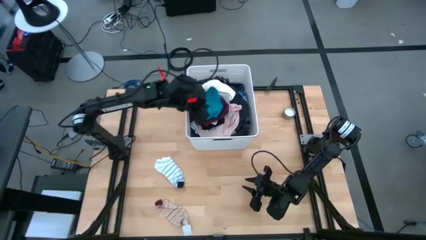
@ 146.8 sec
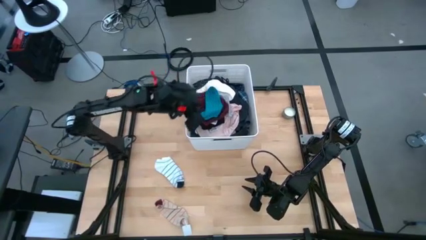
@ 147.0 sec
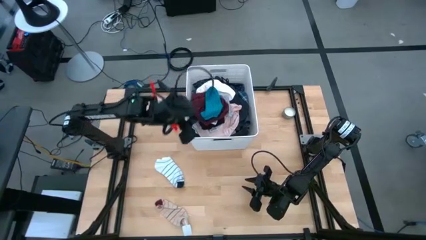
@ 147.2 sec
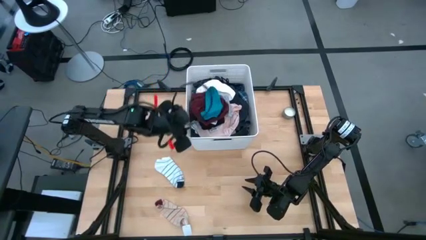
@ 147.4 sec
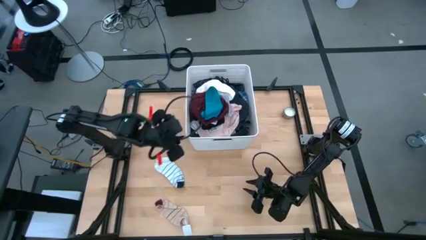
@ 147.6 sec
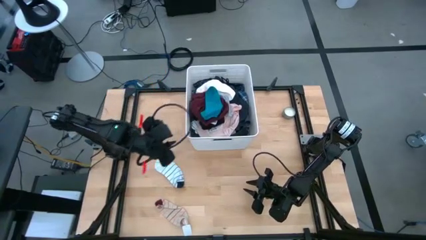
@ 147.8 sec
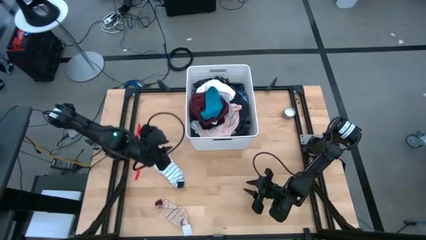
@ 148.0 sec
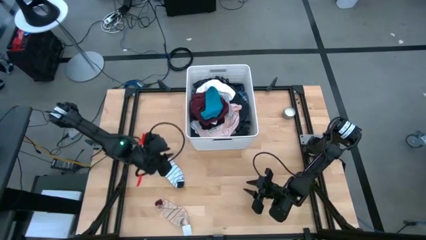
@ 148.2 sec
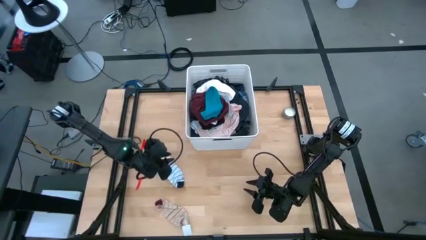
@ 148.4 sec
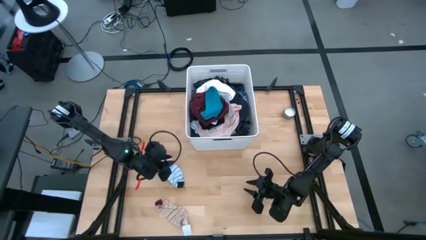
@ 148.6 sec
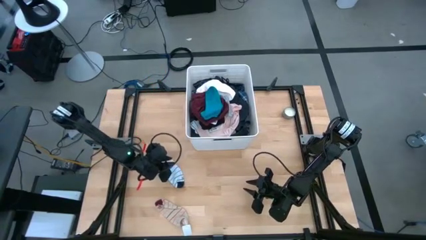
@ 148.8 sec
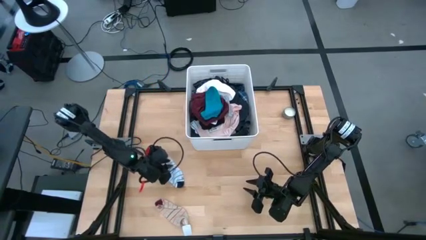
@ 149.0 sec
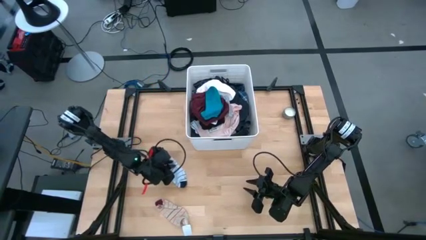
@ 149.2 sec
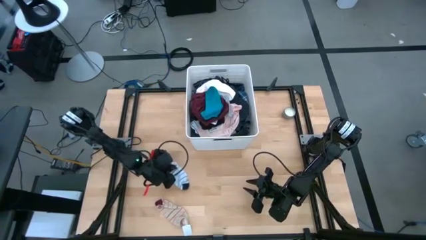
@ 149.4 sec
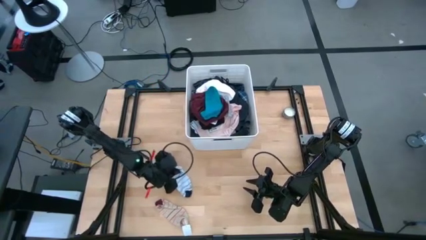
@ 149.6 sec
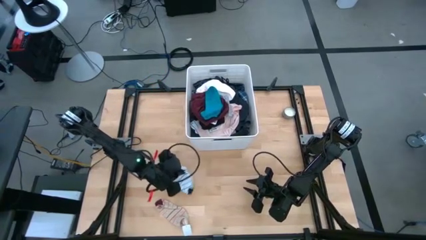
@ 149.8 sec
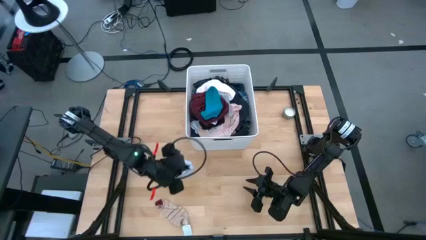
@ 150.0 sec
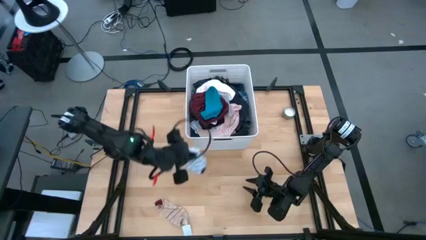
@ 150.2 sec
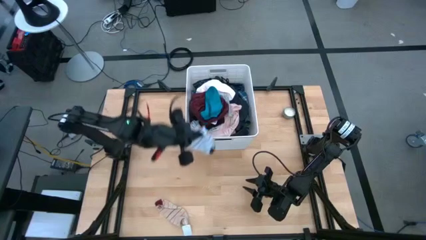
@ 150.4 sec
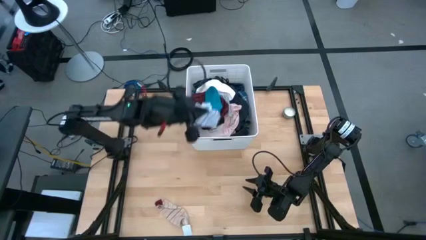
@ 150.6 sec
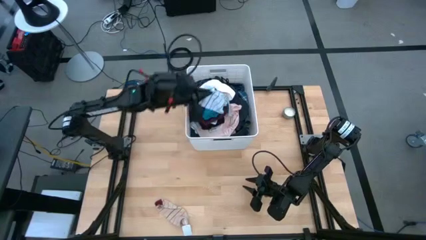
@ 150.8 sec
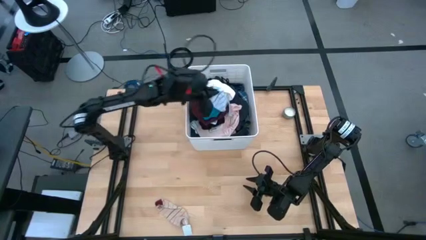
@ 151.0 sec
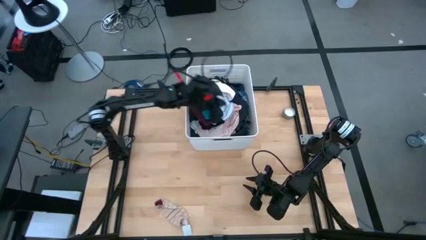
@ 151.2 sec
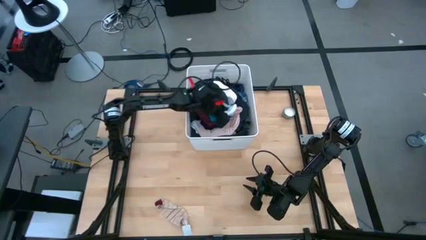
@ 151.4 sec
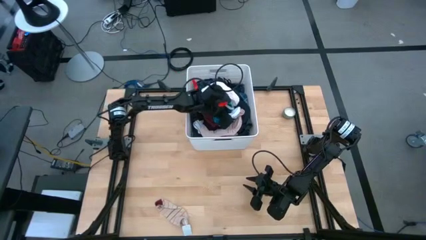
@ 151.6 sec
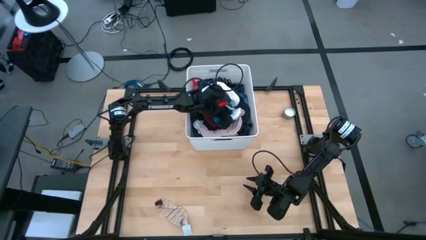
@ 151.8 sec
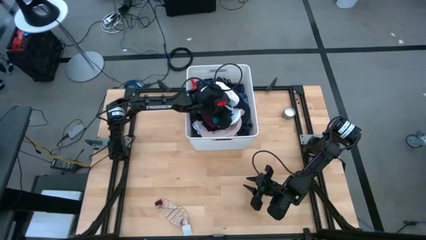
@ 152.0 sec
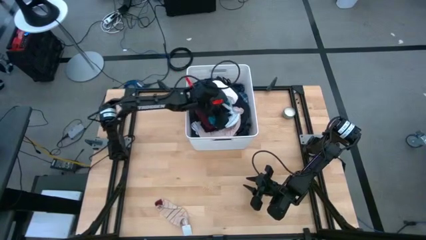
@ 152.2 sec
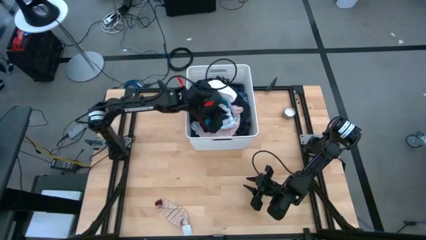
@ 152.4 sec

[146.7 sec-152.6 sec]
Task: Sort clothes
Put the white sock into the laundry bin

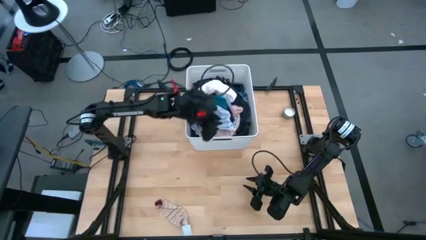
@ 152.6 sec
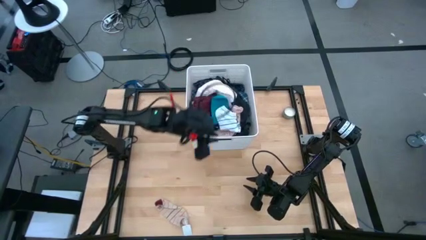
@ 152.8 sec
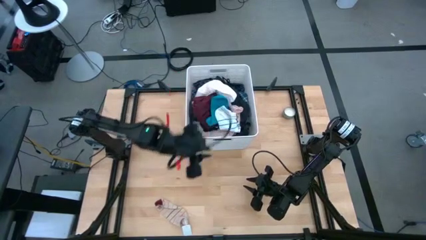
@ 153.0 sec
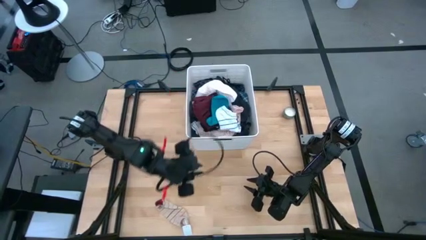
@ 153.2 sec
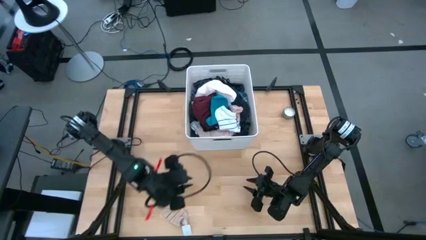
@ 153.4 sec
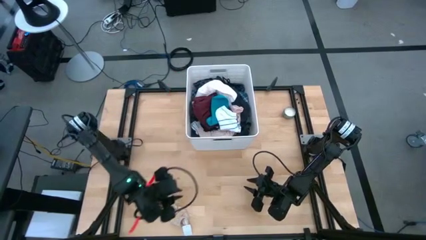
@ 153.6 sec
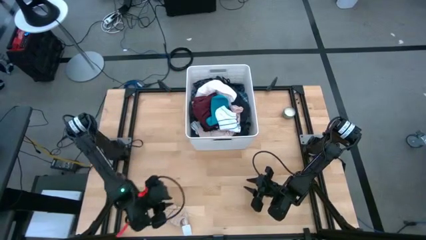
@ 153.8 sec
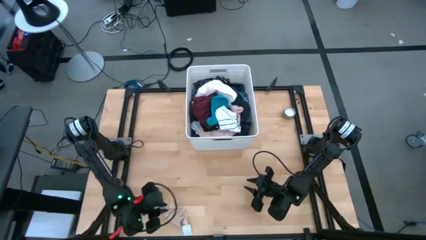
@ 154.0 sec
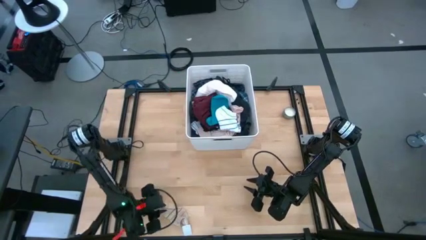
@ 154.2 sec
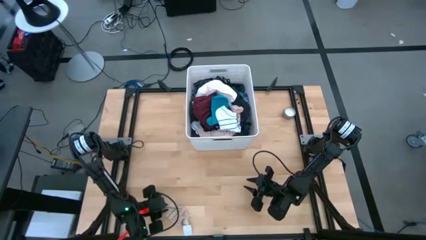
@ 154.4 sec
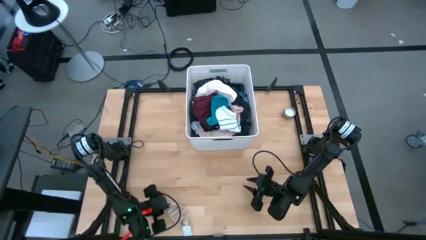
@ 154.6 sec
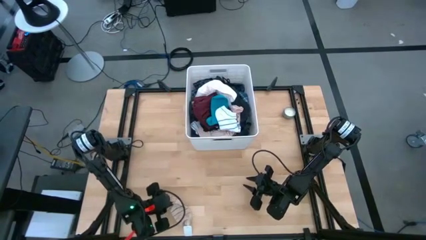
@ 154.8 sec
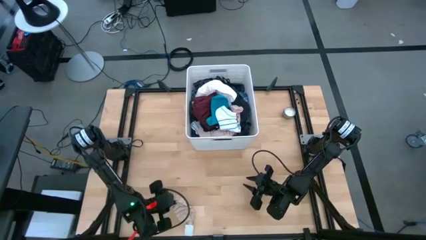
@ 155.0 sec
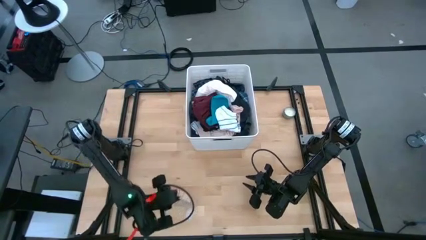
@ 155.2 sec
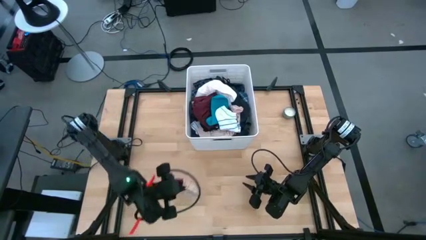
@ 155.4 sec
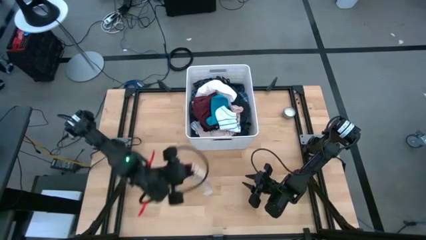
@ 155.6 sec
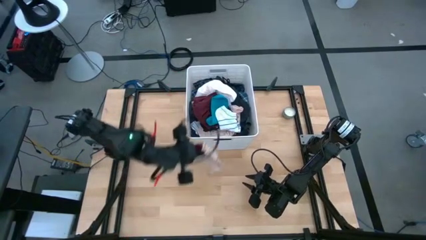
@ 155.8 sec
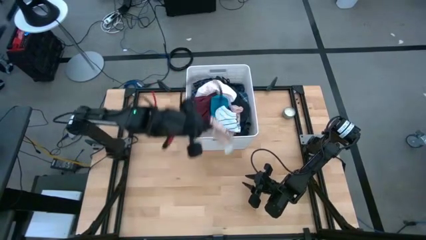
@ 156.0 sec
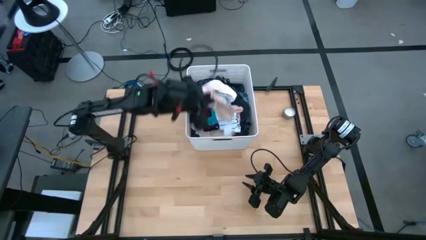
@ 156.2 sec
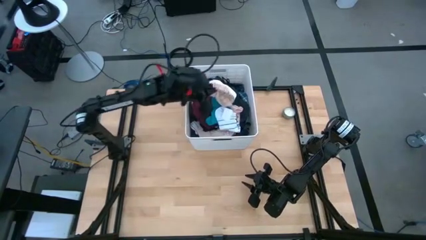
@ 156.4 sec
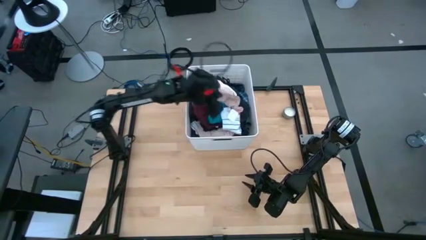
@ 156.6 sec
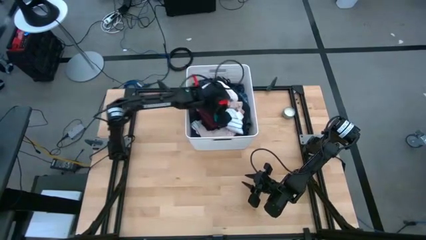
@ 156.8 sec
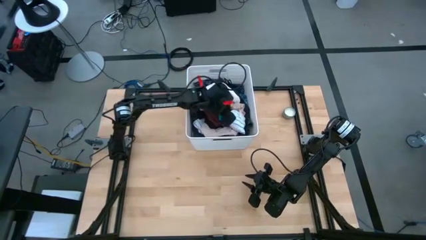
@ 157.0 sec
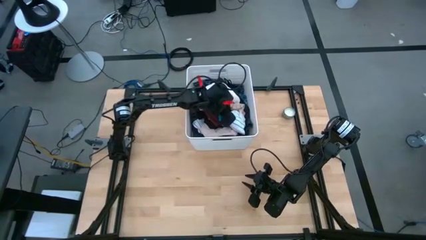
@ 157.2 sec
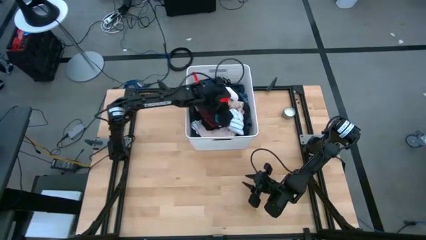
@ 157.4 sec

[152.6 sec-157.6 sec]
Put the peach sock into the laundry bin

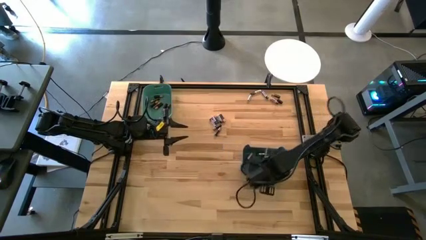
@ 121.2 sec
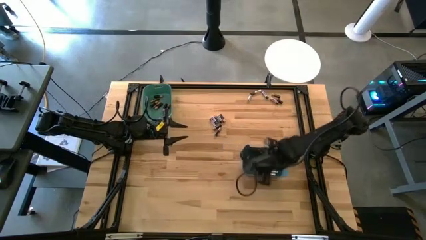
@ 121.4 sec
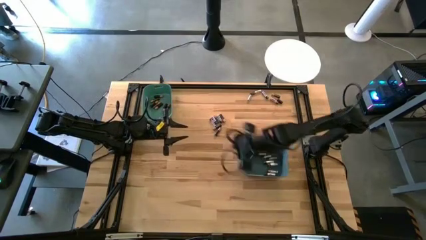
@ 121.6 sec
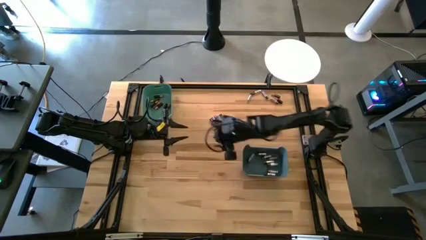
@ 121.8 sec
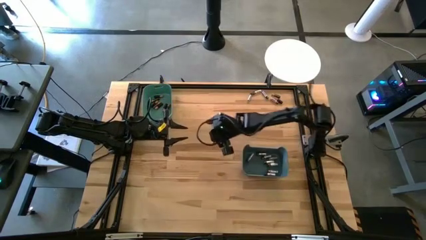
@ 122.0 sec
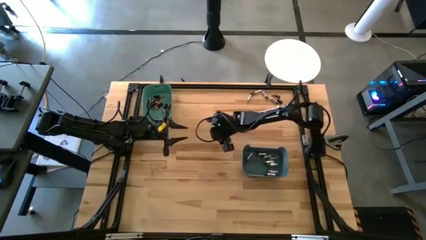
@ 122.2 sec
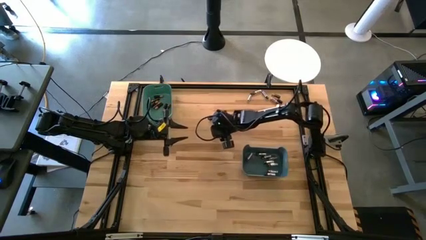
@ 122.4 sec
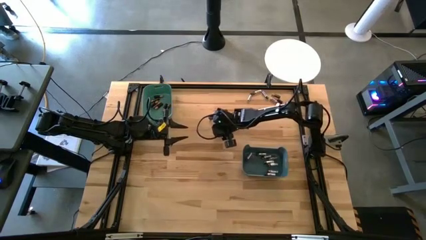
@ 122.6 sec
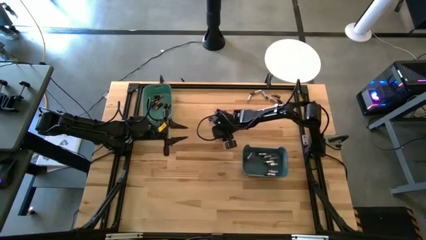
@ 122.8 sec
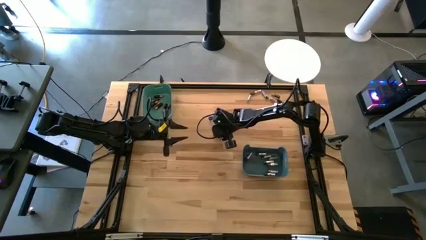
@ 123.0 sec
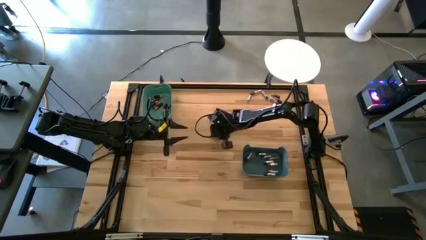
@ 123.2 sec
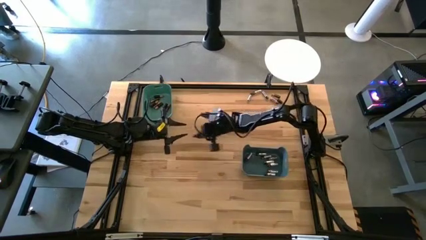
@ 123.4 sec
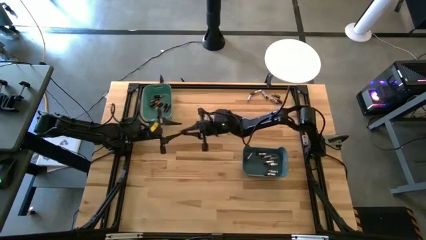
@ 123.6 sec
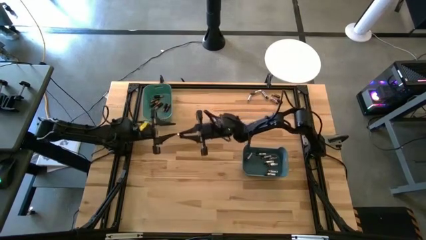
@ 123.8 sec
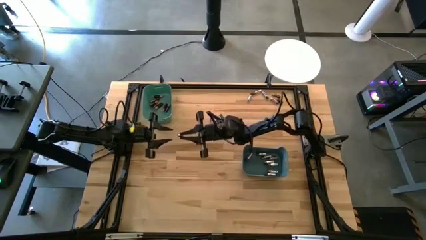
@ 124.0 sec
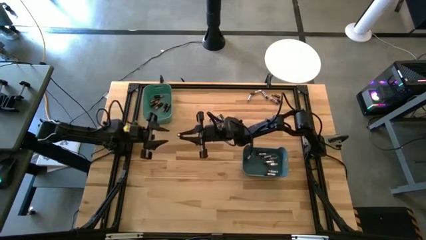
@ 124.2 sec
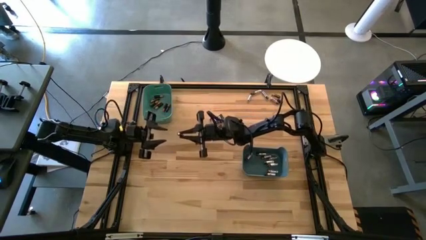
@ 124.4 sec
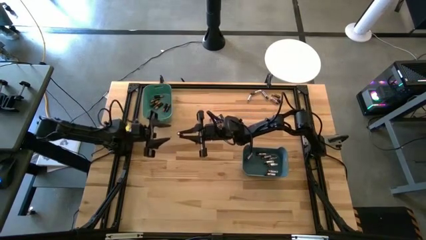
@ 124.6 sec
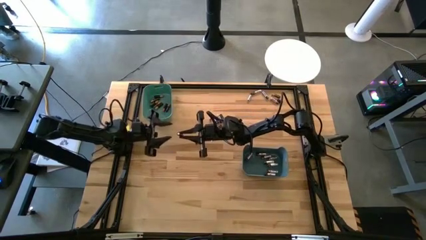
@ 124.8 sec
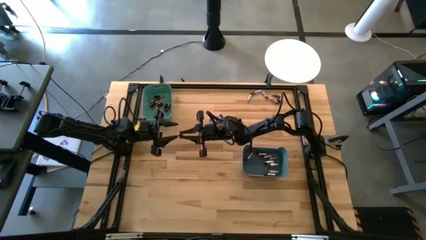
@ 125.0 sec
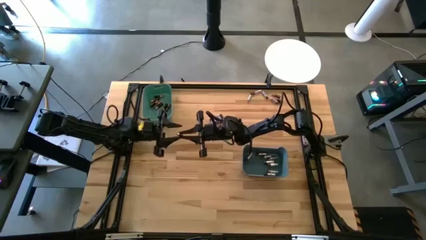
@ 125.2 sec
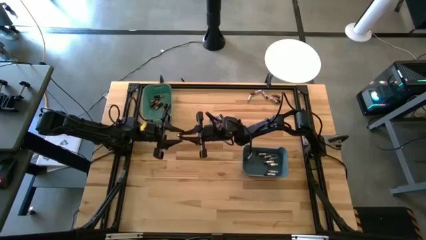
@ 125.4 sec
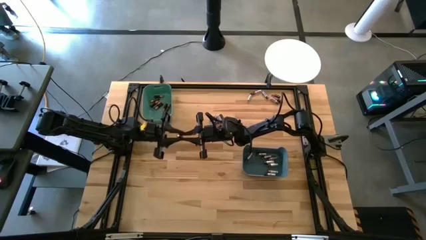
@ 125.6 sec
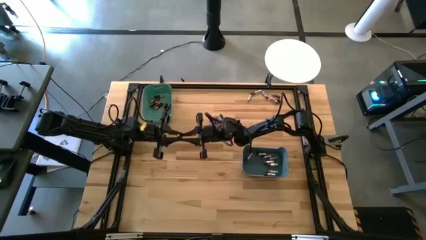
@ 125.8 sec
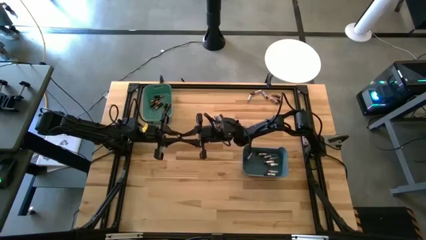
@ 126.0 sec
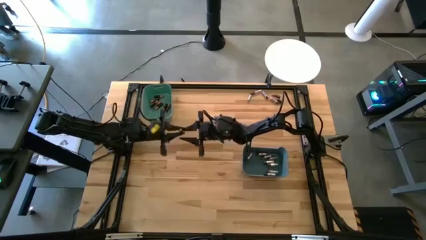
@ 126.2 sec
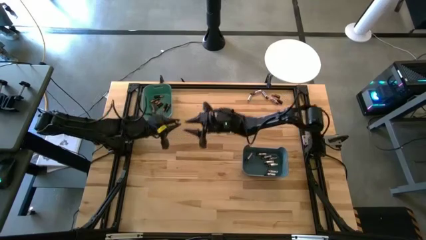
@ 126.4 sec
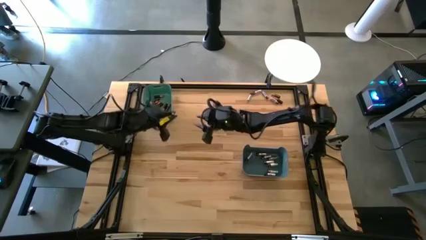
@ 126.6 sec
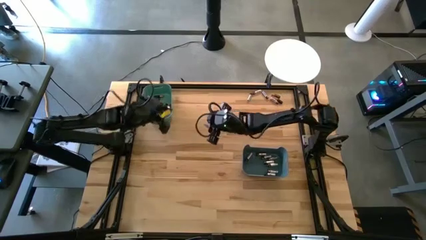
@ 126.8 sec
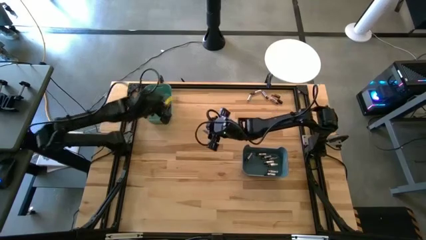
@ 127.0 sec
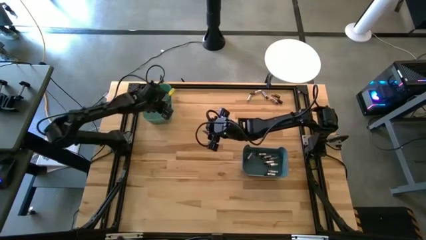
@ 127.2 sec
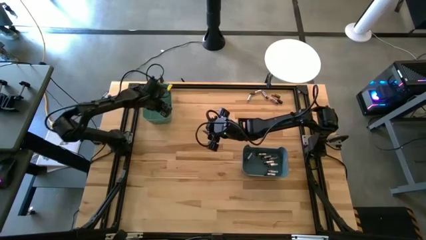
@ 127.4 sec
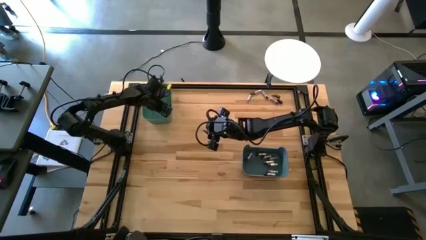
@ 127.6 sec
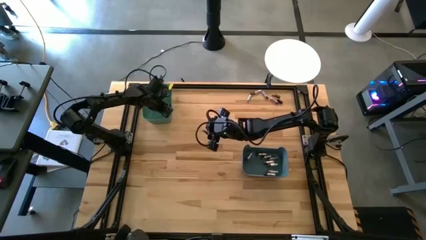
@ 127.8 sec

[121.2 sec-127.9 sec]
Task: Sort batteries
Put the black battery into the green bin
